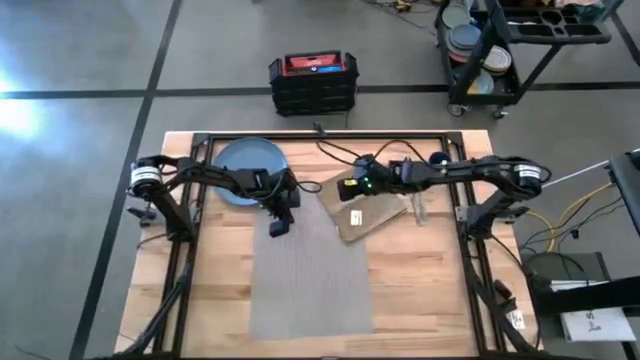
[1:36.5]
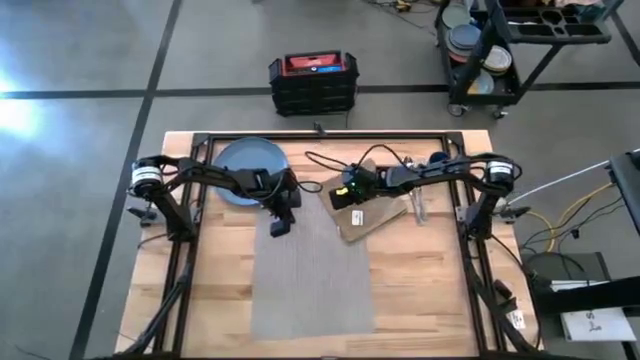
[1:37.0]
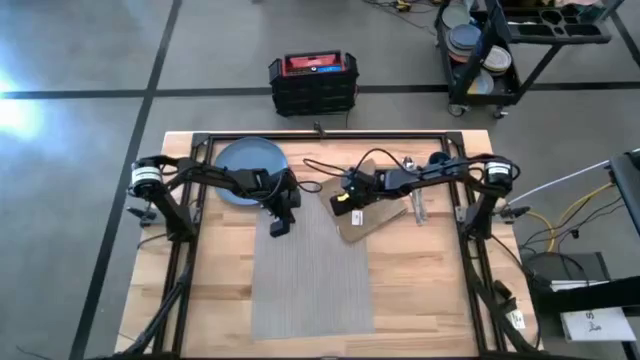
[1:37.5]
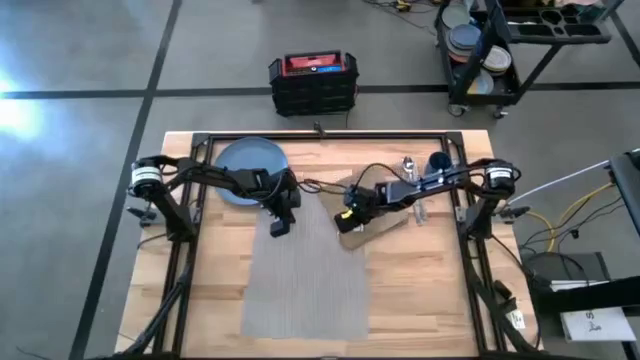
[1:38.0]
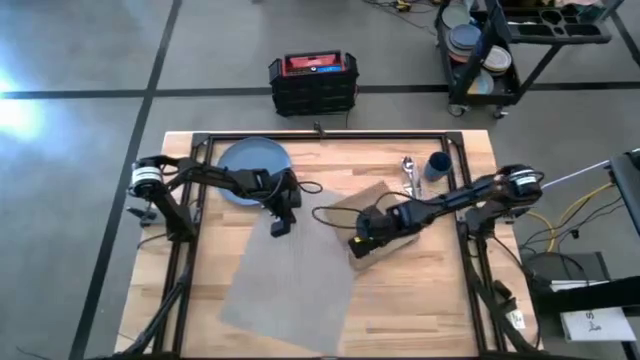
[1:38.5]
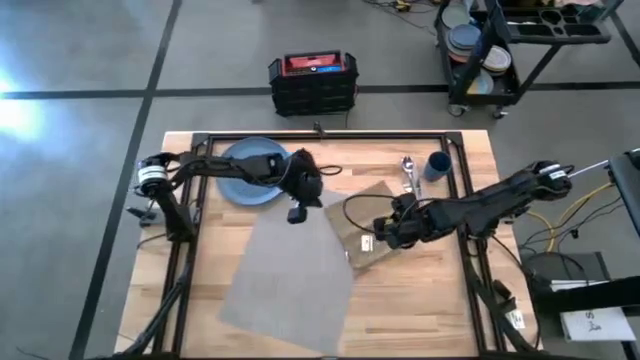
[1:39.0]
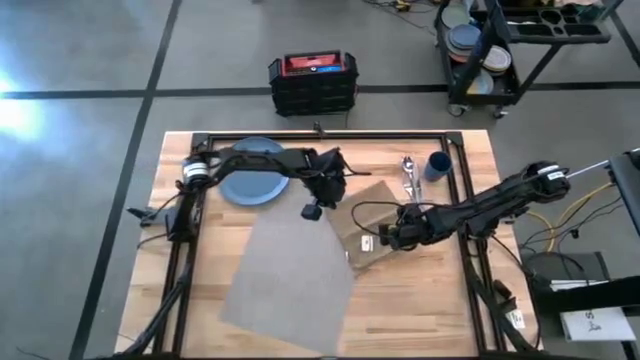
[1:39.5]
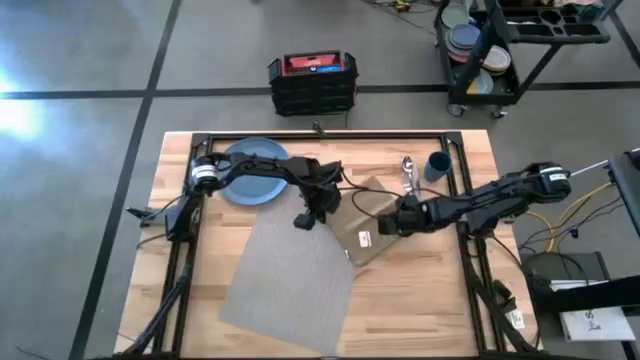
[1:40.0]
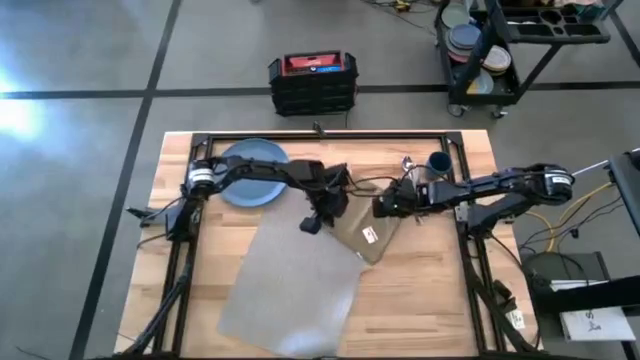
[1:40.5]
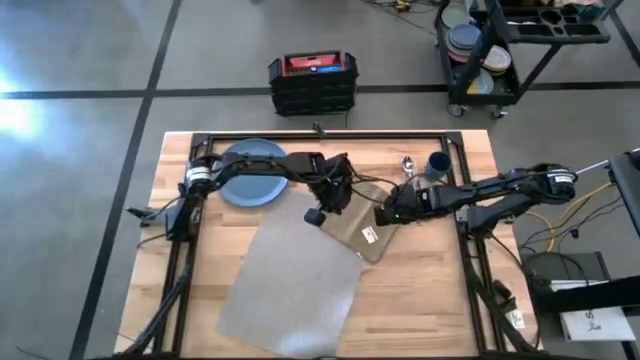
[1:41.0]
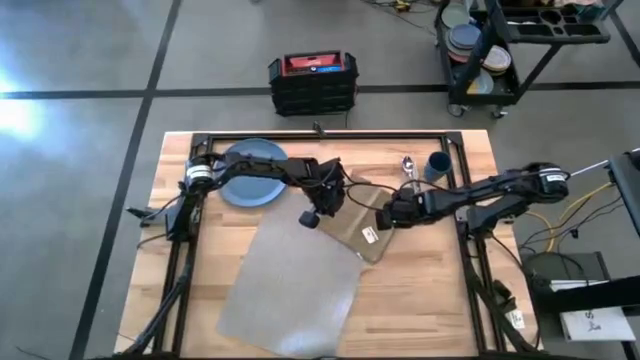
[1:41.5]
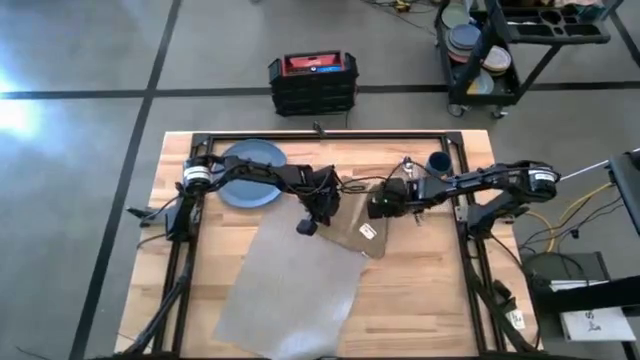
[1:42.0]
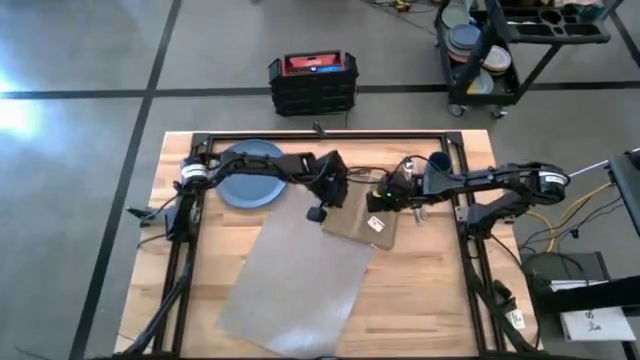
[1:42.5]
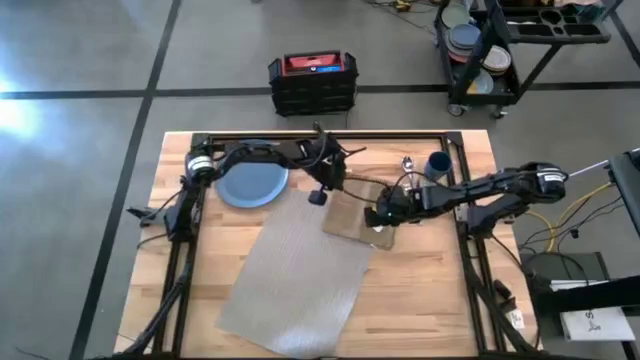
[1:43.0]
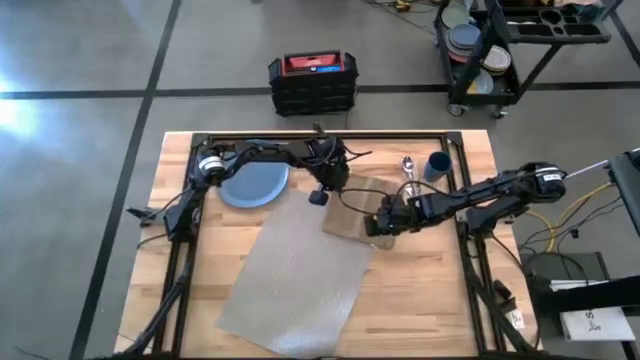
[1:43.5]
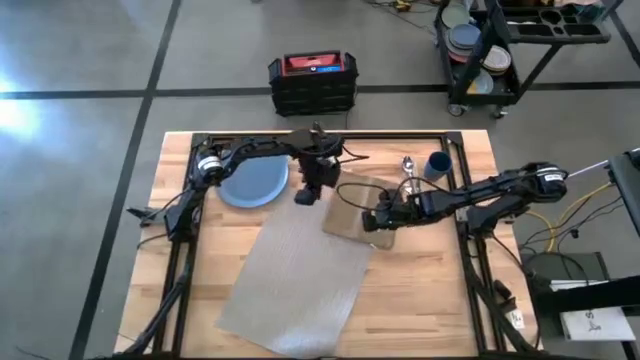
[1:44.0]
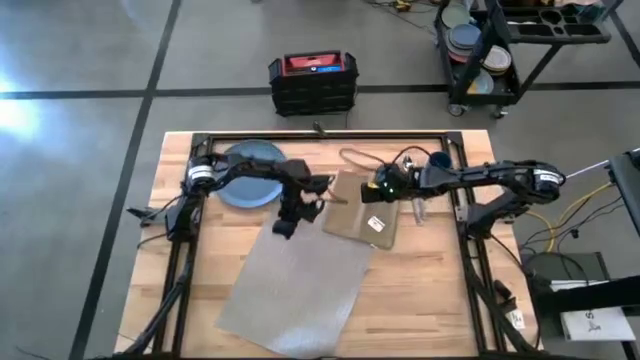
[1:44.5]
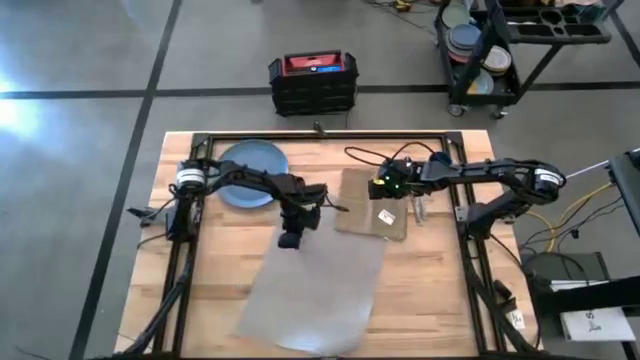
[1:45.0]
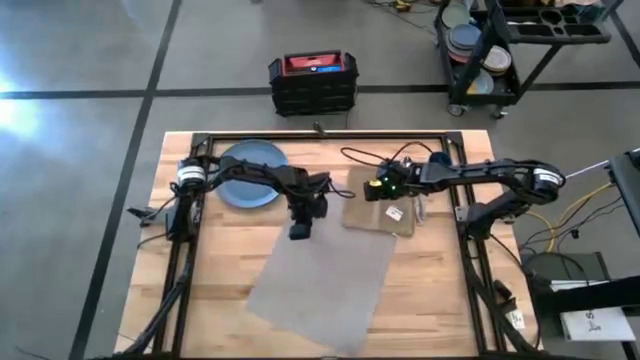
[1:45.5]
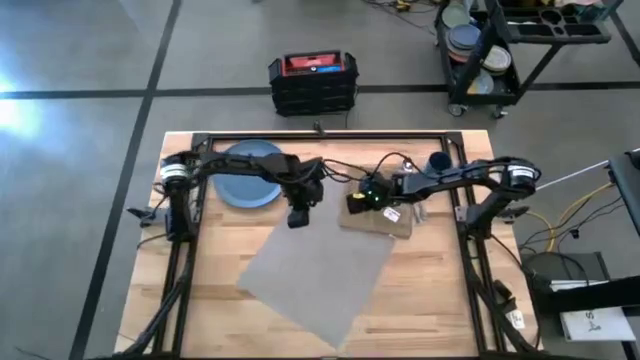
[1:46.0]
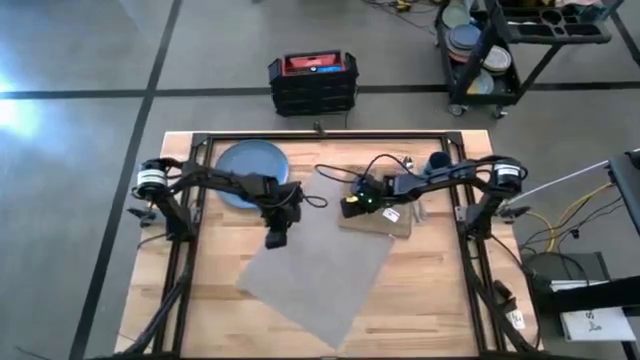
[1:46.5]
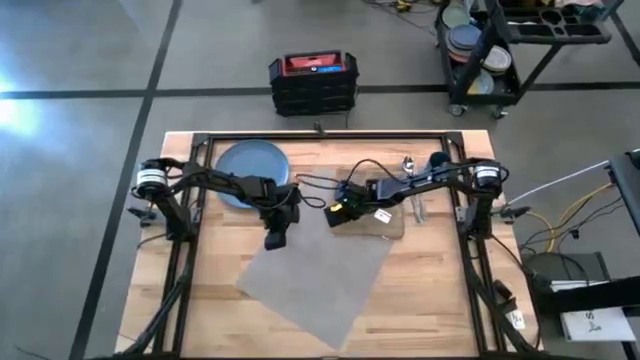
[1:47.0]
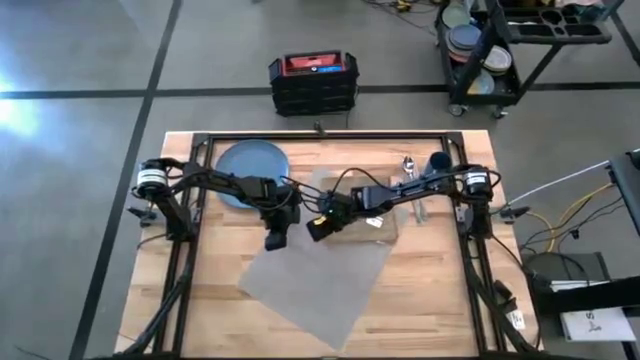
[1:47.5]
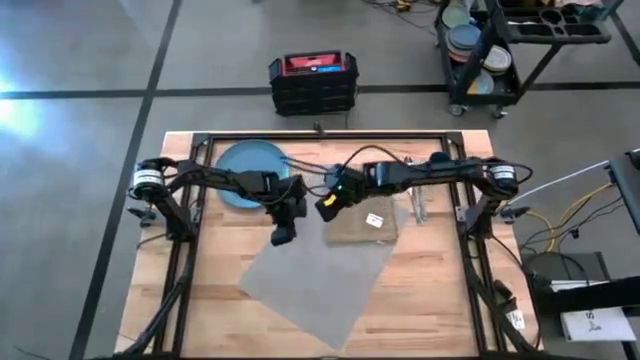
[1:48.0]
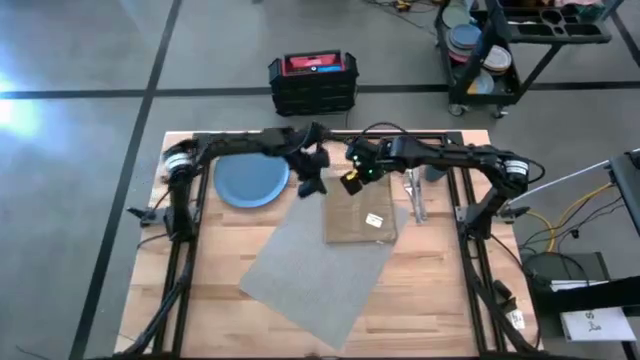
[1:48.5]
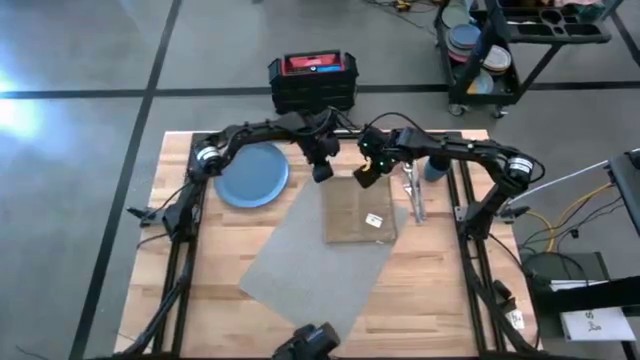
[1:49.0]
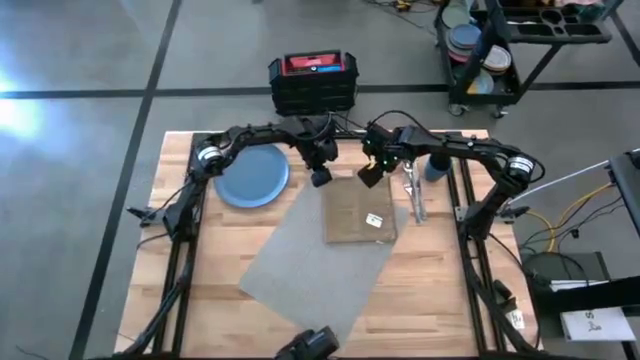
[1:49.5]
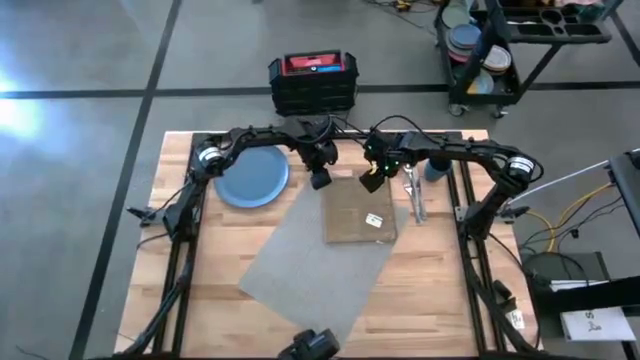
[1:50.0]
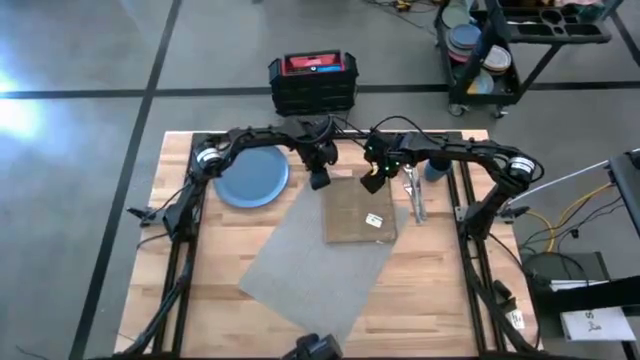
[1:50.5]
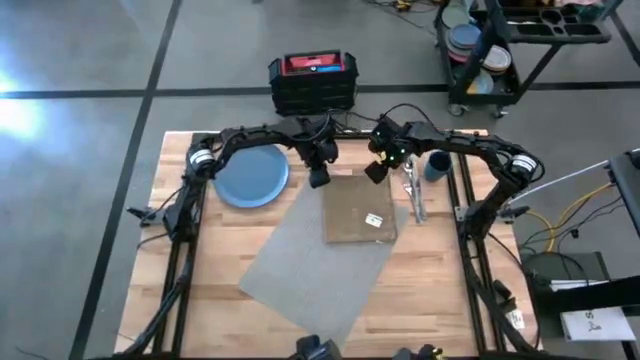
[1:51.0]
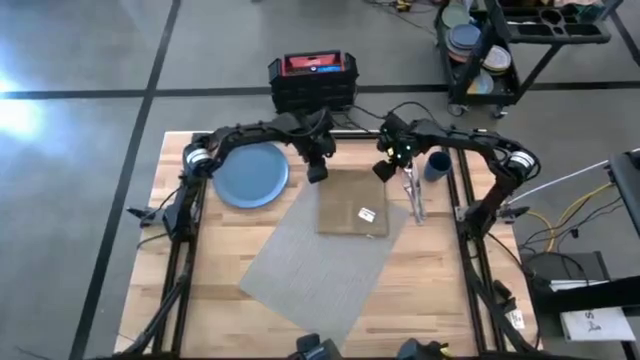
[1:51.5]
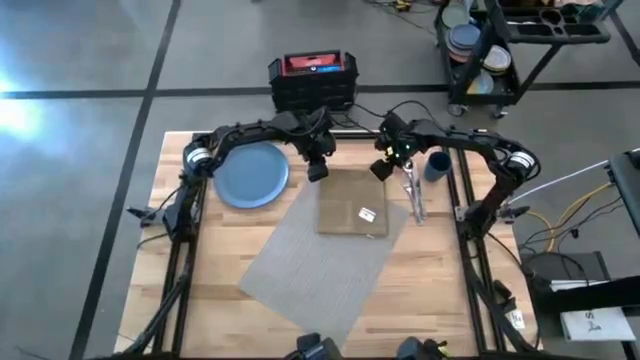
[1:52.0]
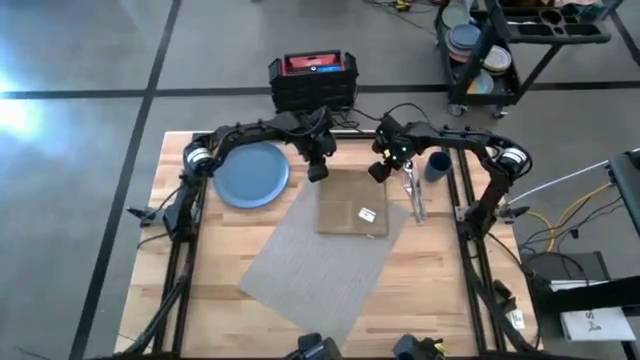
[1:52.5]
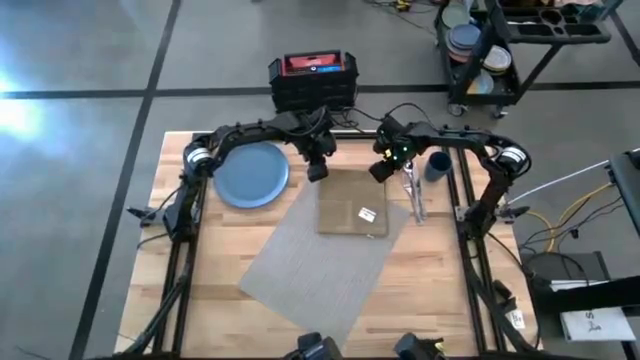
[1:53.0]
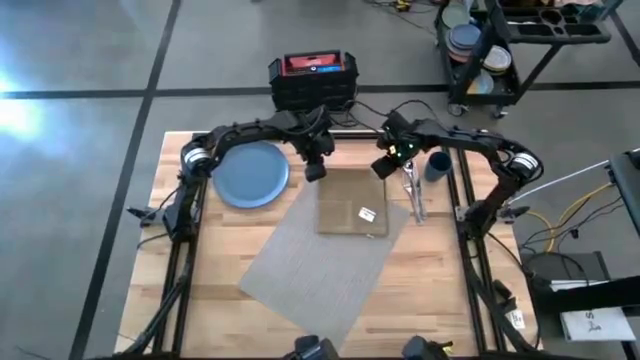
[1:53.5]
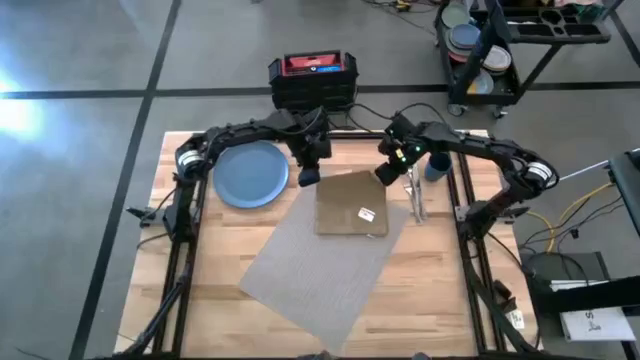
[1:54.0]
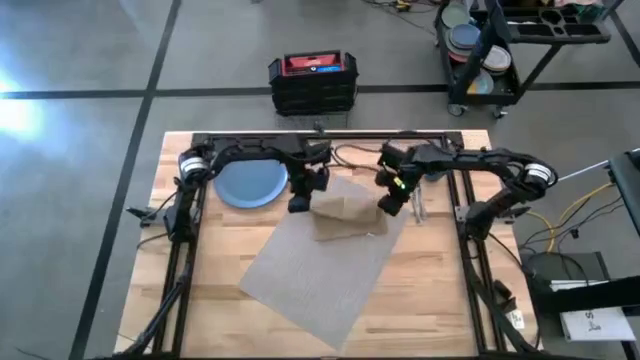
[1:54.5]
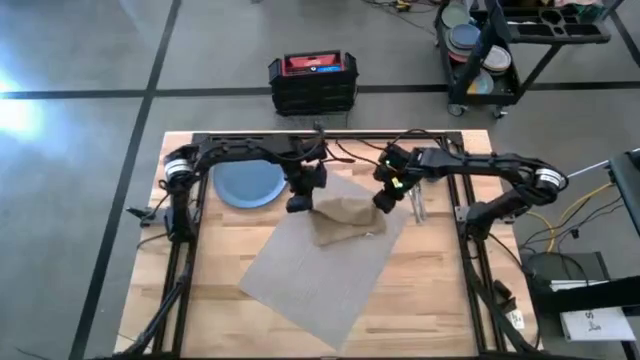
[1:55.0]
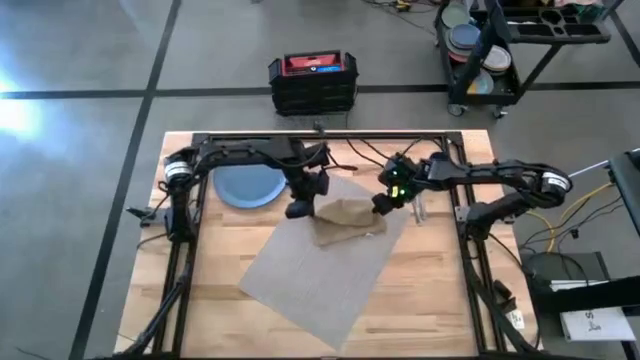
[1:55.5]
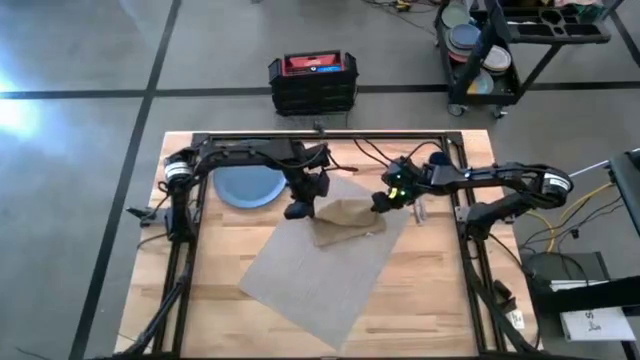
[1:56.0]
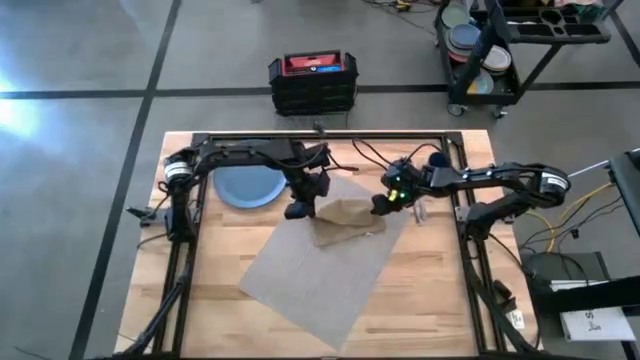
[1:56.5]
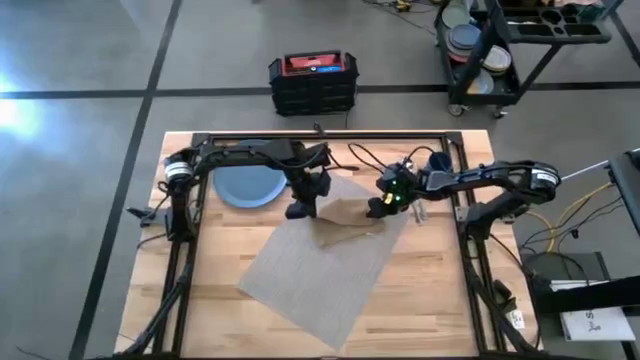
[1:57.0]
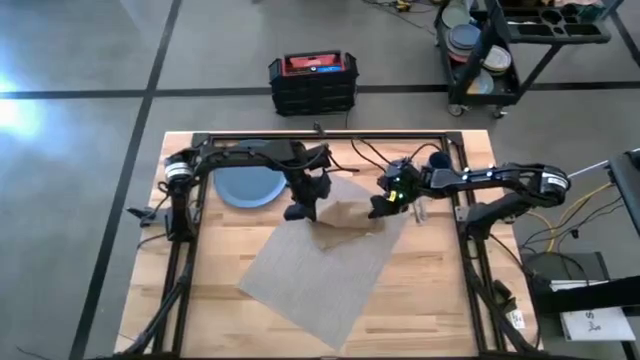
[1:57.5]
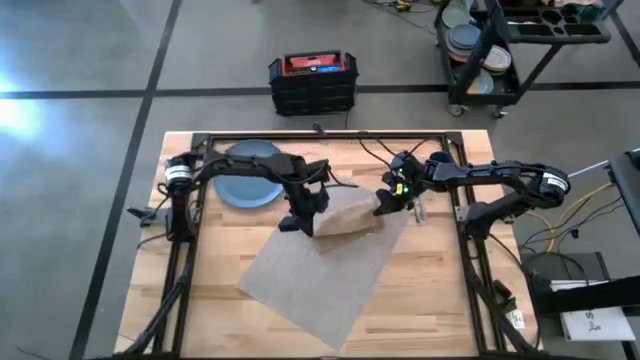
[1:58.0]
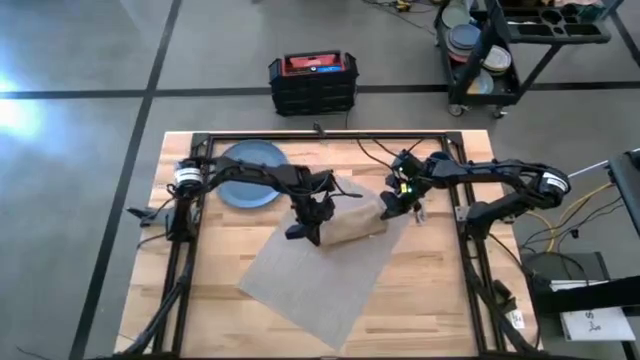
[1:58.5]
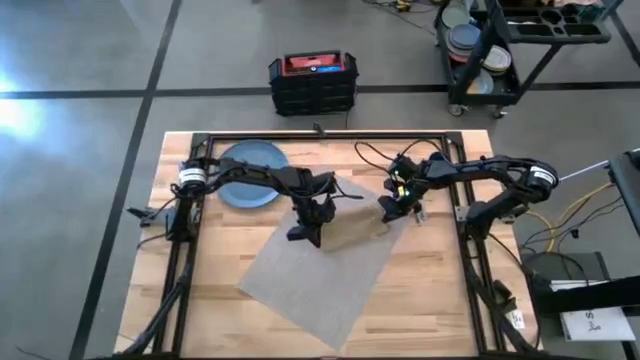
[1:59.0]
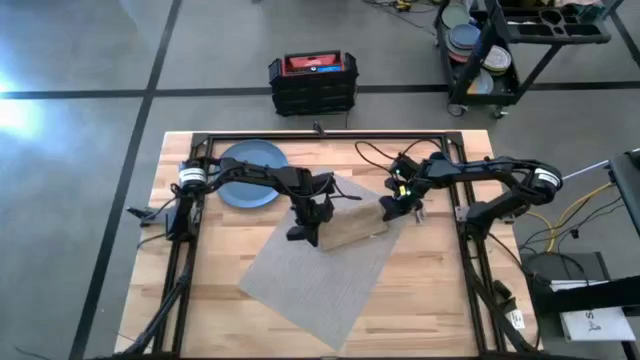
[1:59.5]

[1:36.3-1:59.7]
Task: Set table place
Fold the brown table napkin
